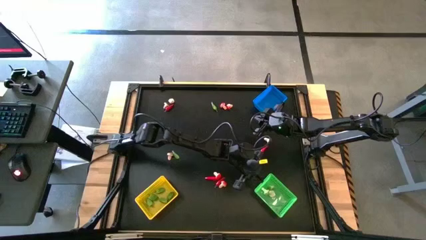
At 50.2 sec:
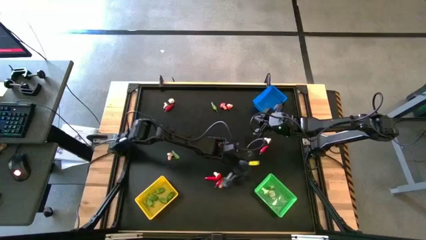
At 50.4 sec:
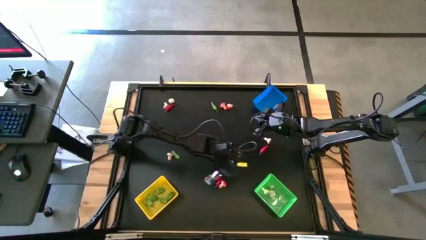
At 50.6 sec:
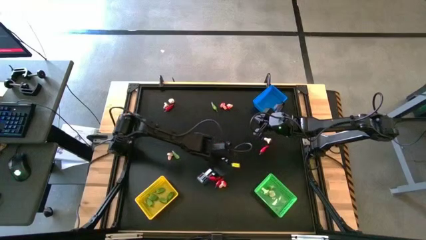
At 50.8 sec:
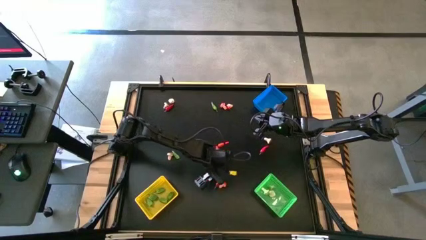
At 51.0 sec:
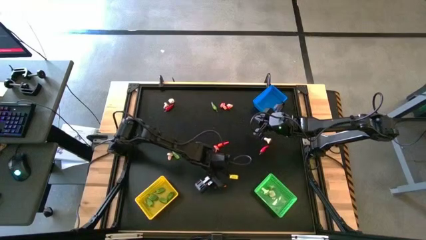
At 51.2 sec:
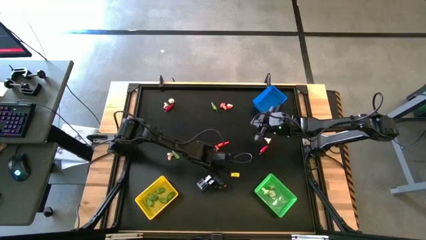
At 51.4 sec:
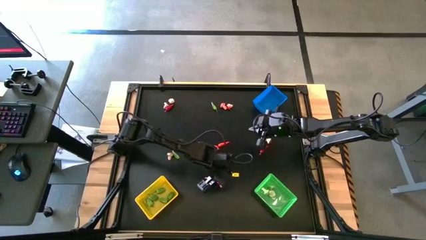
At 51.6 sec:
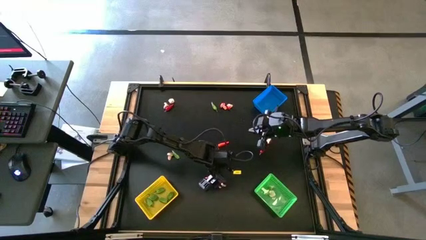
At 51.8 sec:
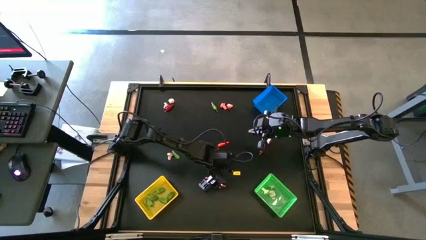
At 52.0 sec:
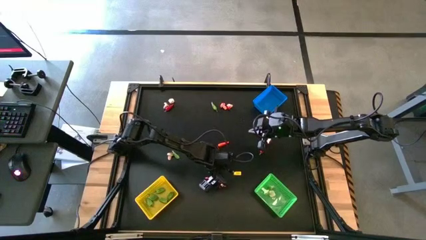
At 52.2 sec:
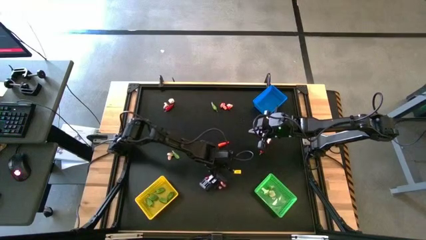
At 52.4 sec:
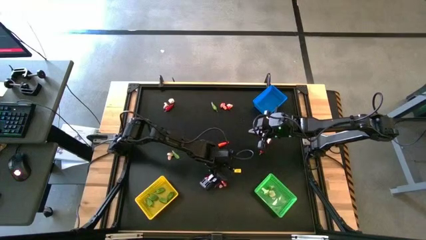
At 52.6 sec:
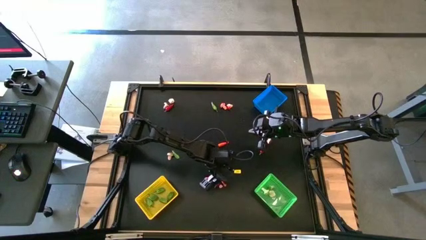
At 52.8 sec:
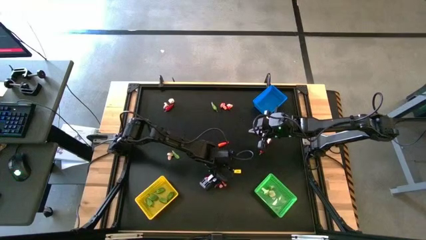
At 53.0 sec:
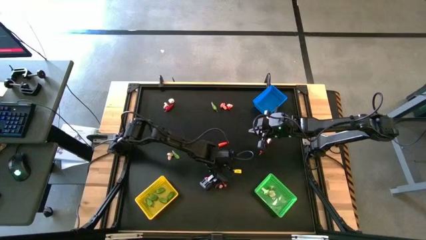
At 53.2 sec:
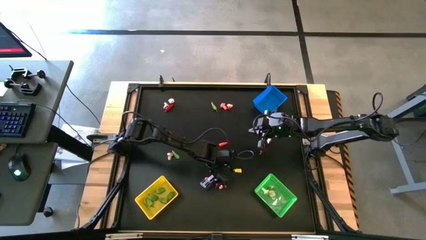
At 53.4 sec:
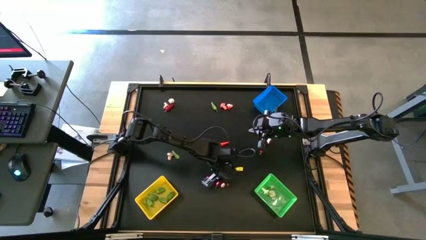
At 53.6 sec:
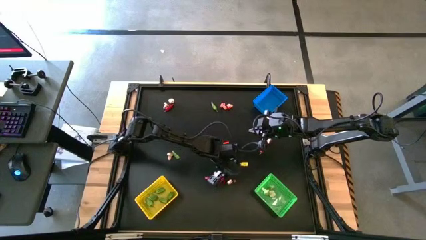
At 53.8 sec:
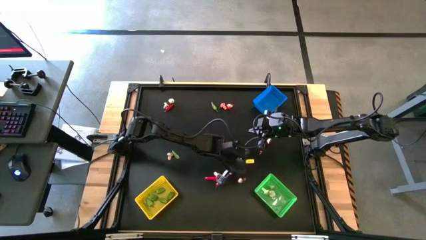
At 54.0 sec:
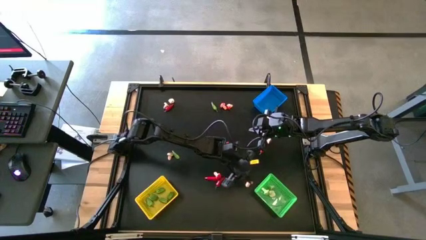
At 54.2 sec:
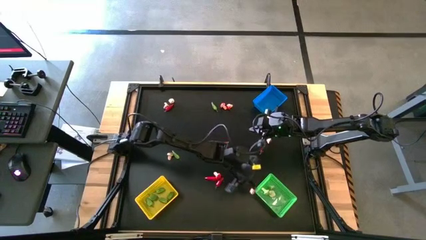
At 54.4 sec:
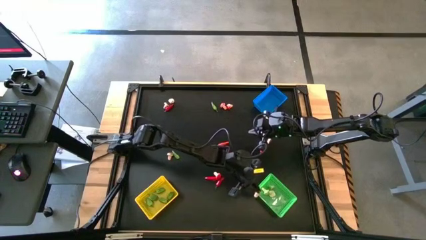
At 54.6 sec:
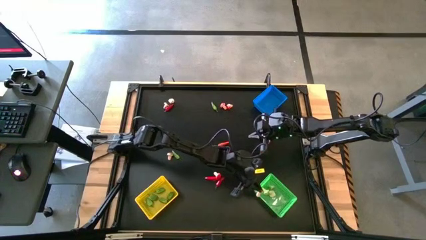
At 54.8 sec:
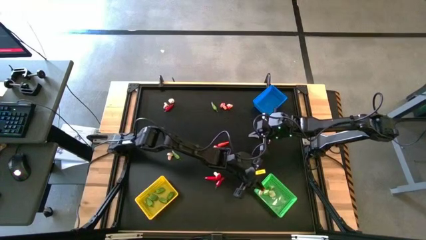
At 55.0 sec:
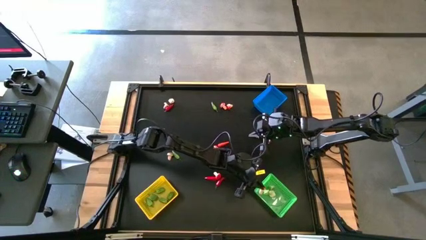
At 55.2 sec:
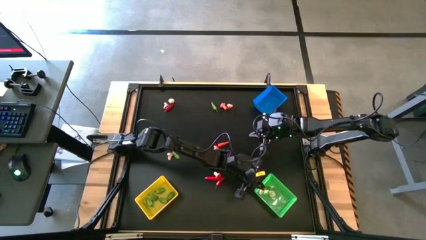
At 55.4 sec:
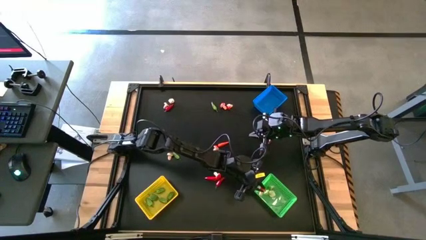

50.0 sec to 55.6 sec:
Task: Sort produce into baskets
Put the red mushroom into the green bin

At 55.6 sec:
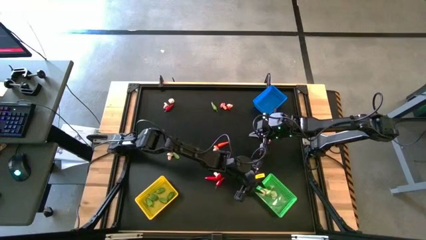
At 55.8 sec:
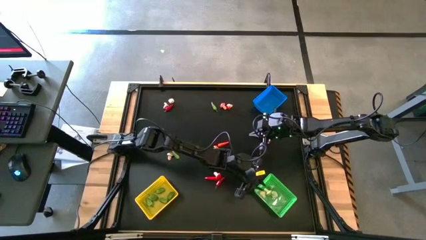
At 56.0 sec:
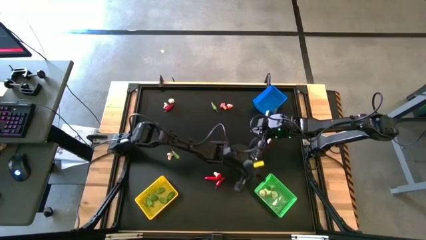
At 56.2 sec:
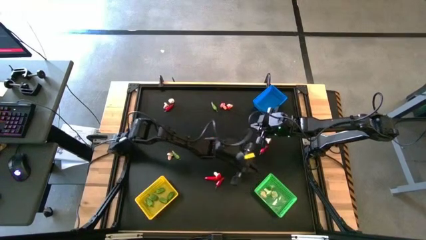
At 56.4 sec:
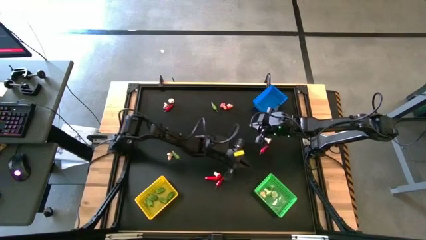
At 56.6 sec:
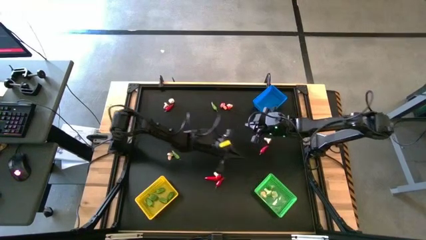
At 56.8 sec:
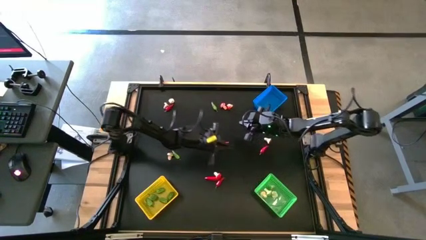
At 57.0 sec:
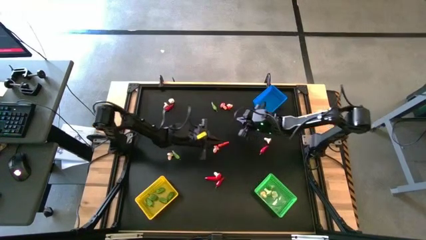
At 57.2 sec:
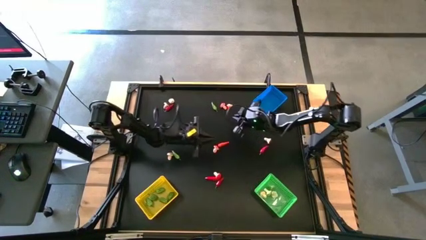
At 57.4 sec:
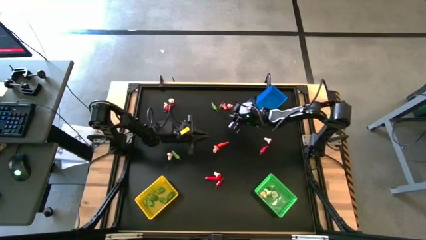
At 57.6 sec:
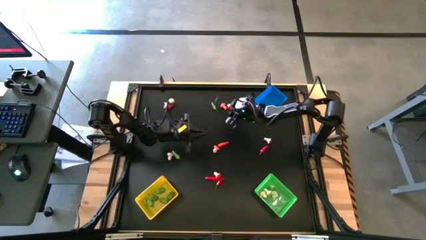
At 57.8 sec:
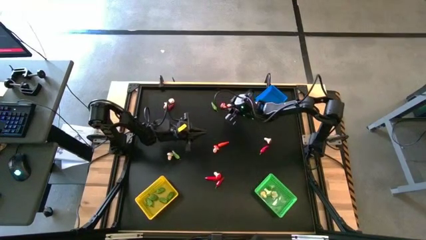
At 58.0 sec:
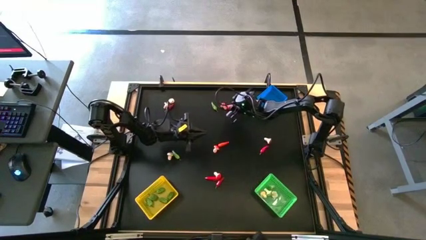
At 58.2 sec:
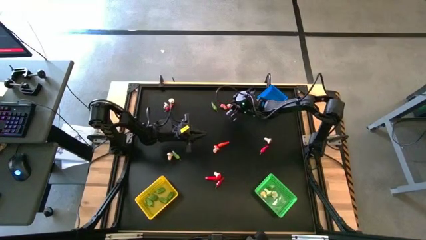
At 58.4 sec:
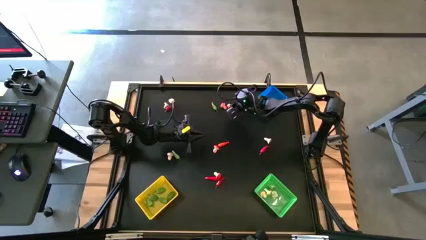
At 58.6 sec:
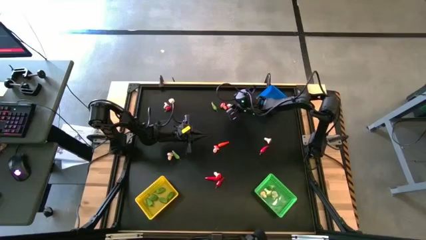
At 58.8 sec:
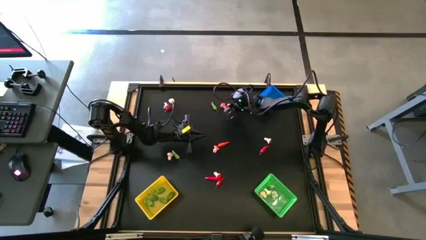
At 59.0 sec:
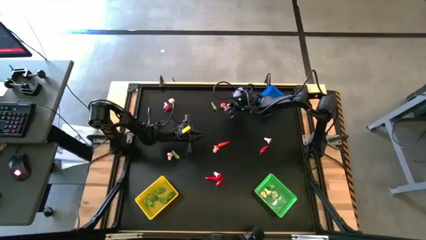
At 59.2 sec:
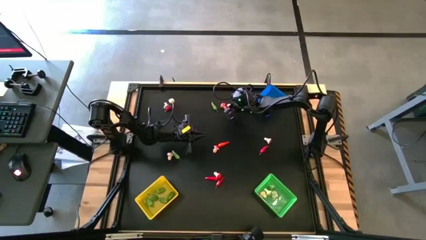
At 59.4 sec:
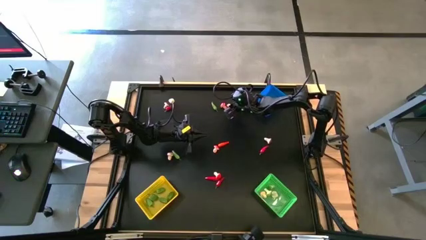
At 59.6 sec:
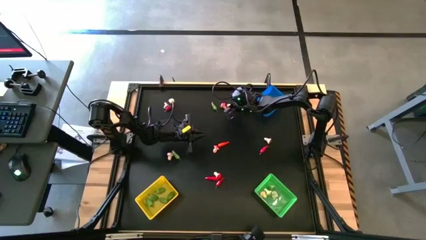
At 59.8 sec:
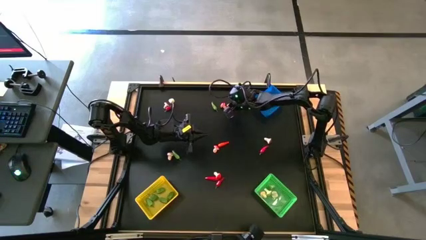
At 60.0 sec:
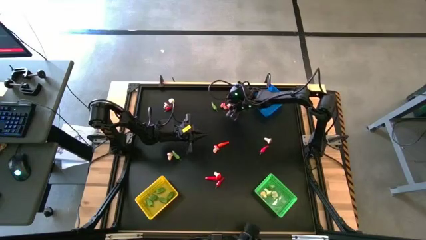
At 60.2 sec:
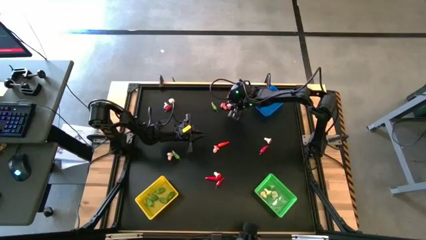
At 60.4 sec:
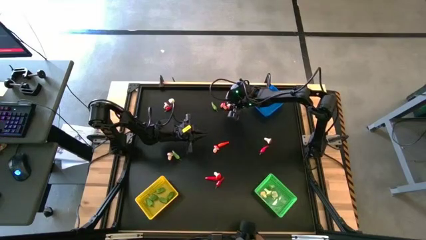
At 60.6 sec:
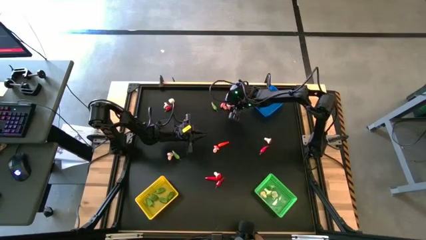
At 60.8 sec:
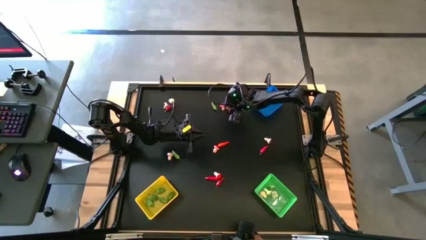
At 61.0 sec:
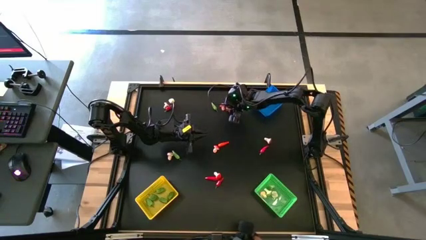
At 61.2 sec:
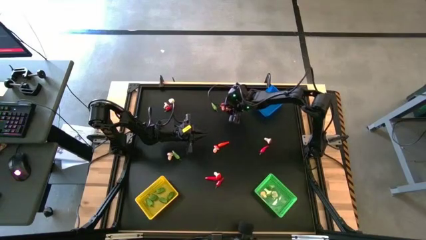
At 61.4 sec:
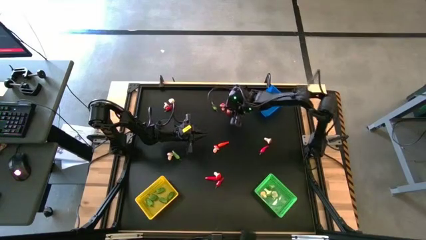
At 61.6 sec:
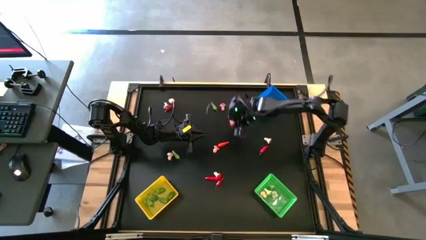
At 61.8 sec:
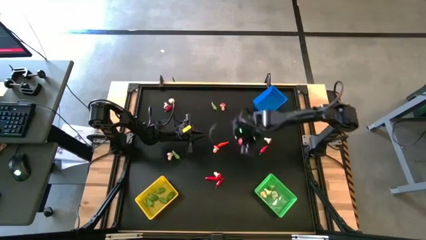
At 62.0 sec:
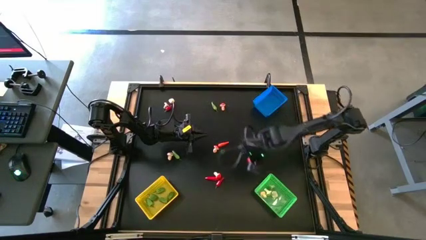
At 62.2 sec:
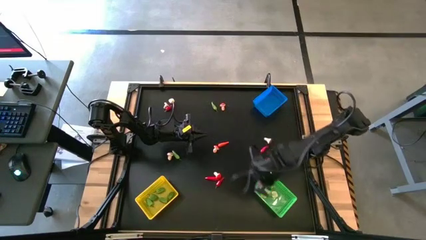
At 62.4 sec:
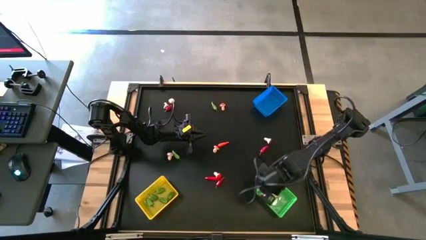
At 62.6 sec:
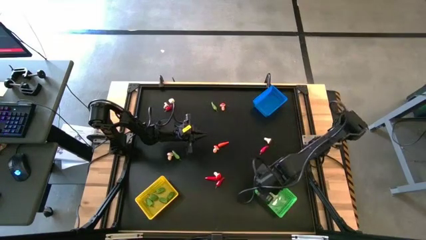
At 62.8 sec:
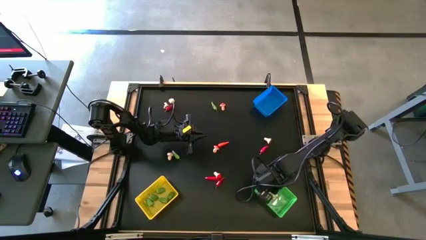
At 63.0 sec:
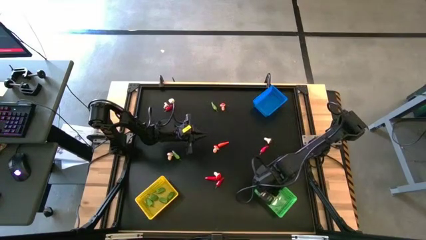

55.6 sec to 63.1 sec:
Put the red mushroom into the green bin

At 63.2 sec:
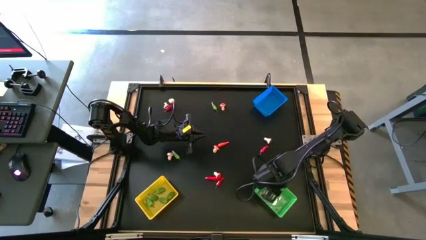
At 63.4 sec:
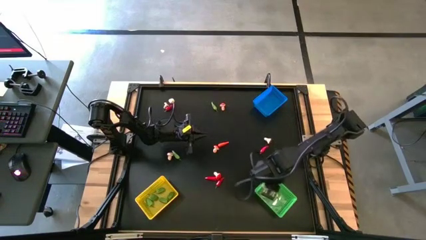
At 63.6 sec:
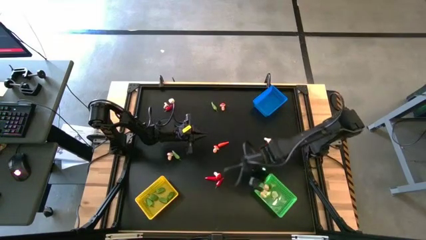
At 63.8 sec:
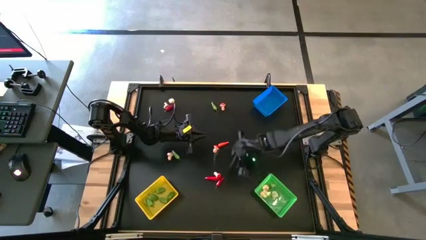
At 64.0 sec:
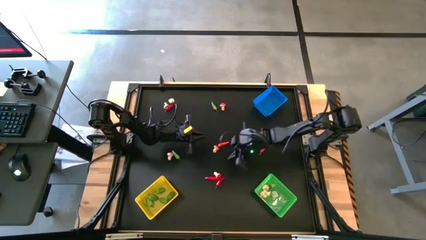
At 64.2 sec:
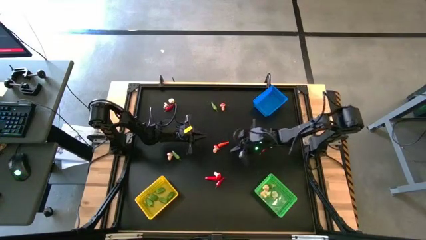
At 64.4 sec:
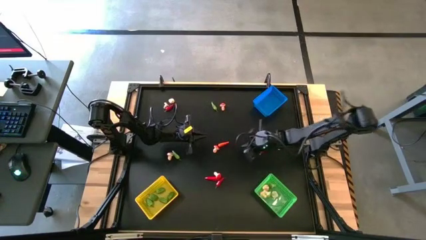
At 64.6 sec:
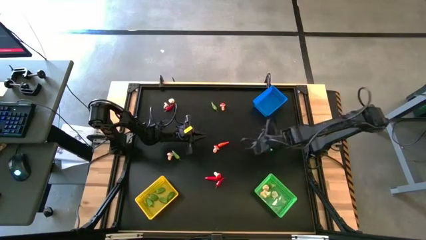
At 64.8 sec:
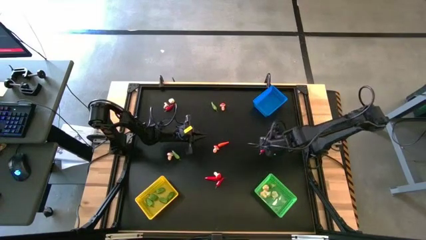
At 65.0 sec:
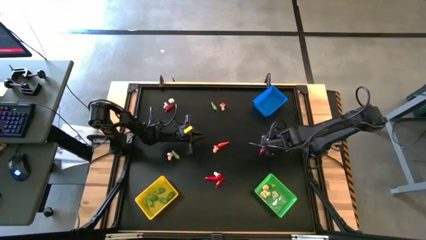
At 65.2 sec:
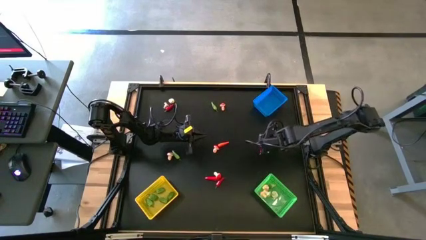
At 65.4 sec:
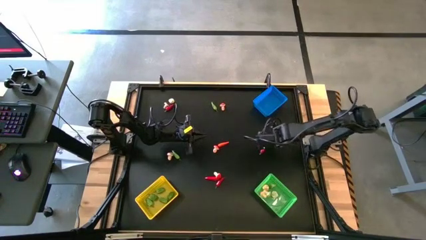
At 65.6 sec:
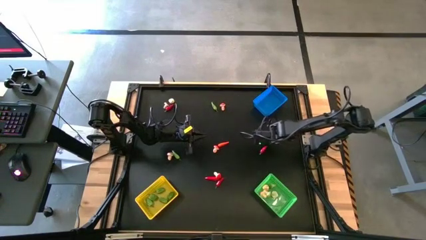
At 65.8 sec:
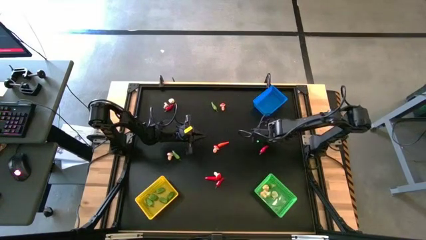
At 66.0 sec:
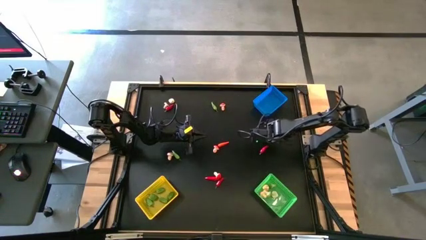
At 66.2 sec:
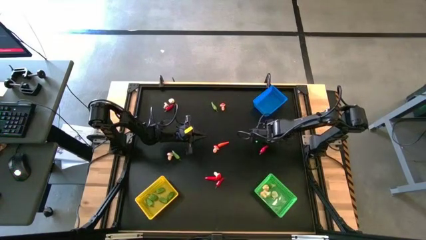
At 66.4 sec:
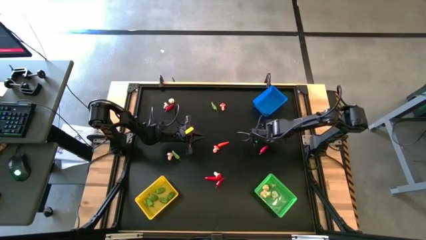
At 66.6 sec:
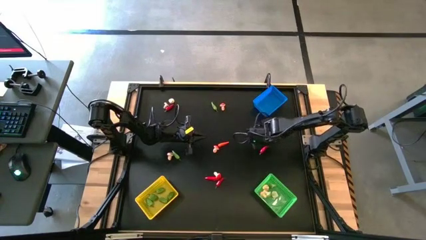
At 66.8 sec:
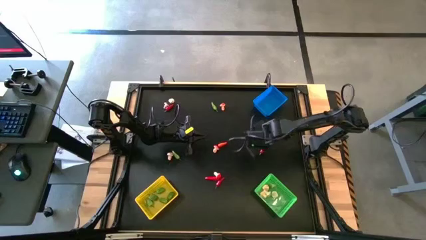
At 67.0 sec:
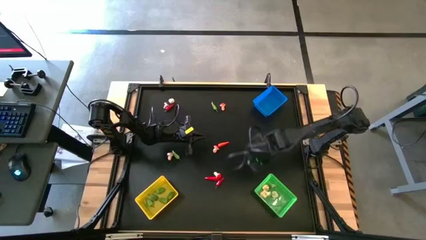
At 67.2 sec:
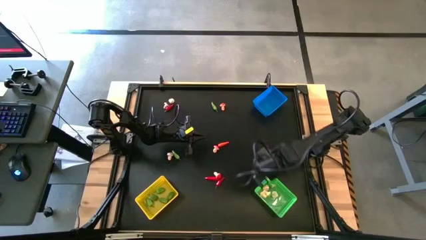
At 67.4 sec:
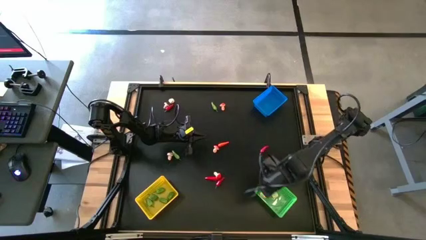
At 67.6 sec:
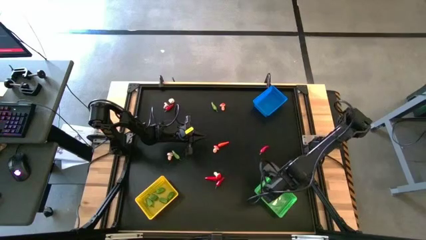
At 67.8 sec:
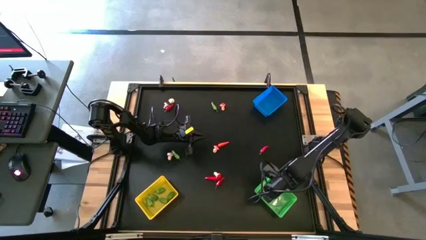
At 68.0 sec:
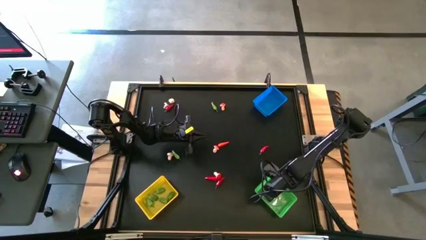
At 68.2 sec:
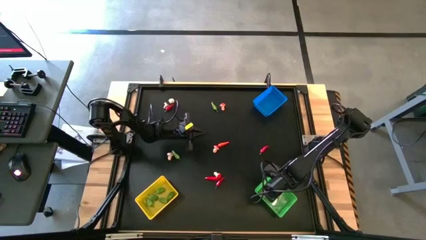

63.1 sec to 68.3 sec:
Put the red mushroom into the green bin
